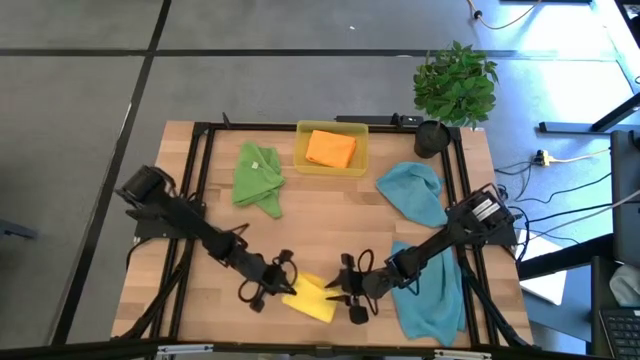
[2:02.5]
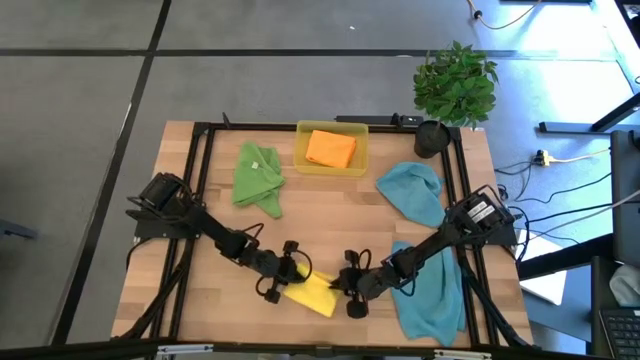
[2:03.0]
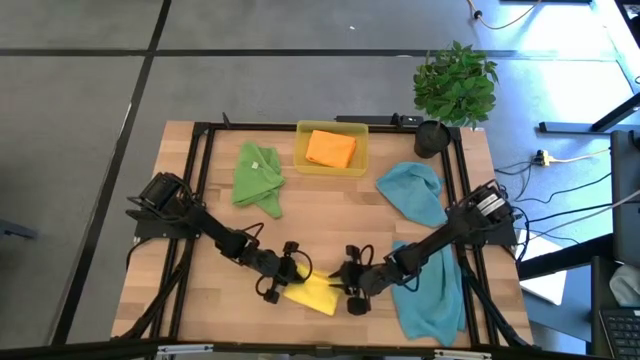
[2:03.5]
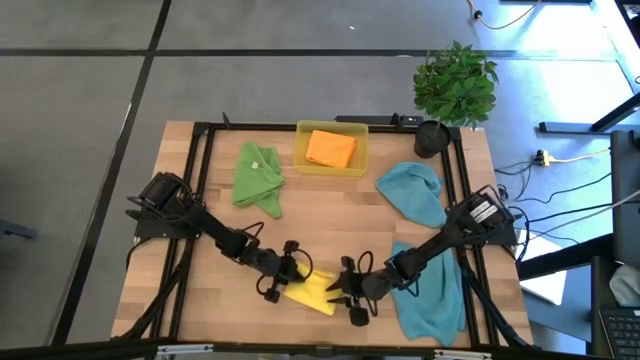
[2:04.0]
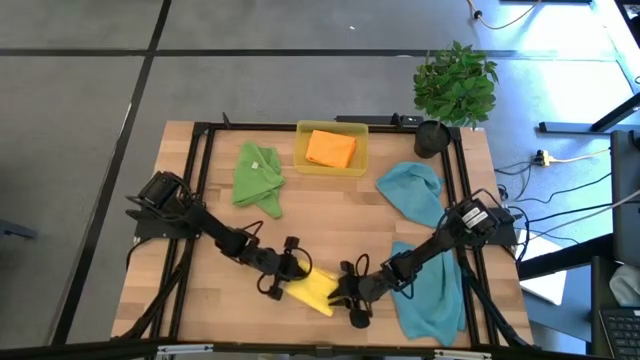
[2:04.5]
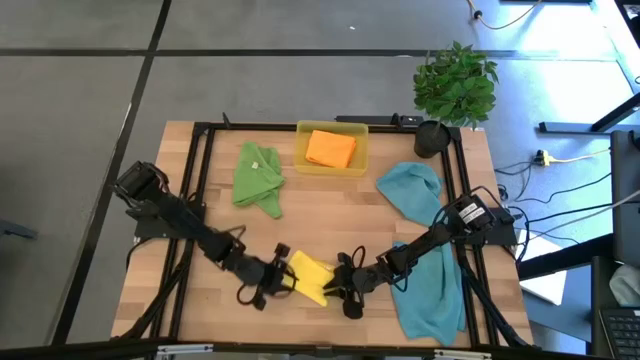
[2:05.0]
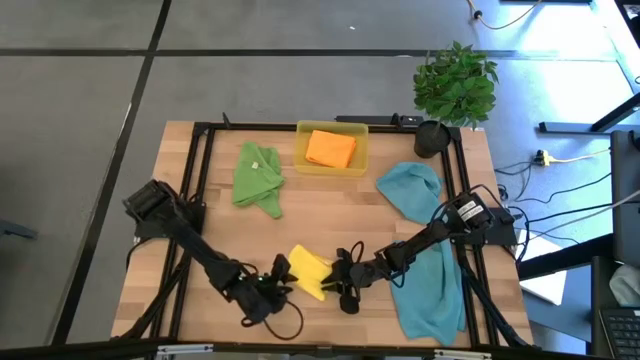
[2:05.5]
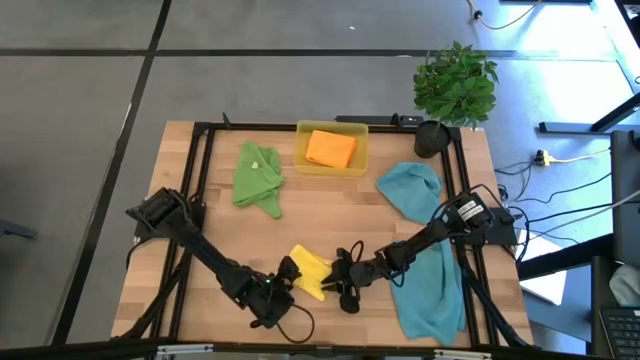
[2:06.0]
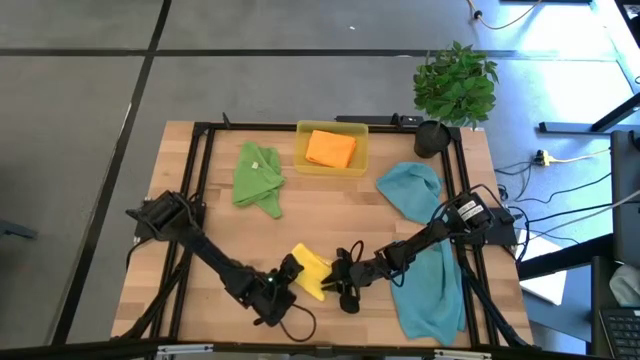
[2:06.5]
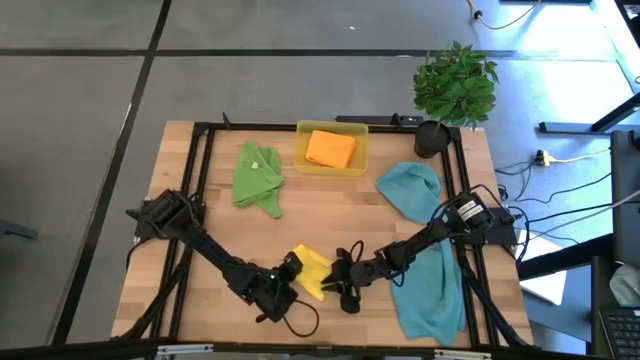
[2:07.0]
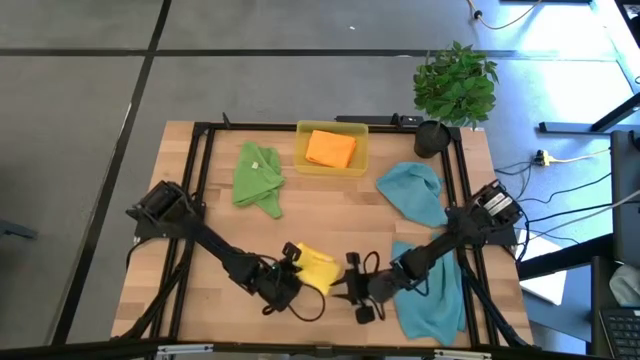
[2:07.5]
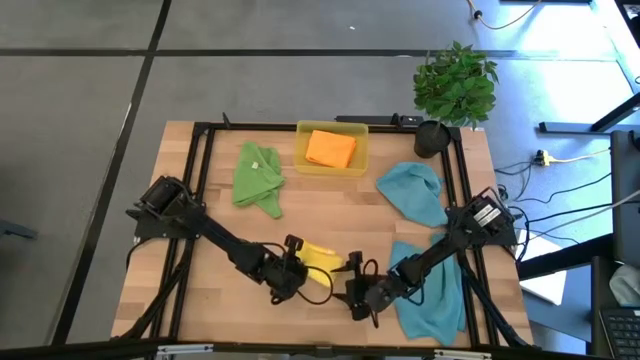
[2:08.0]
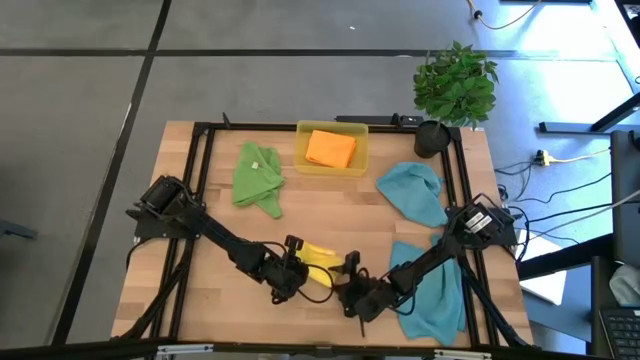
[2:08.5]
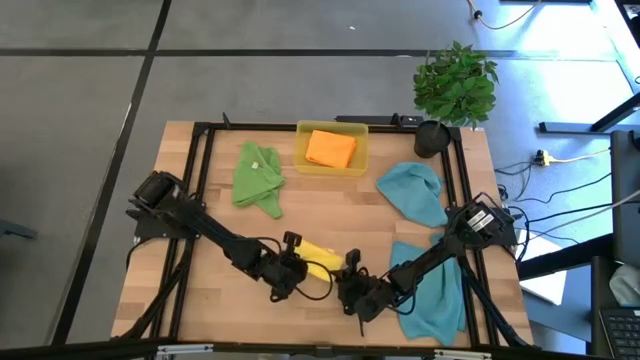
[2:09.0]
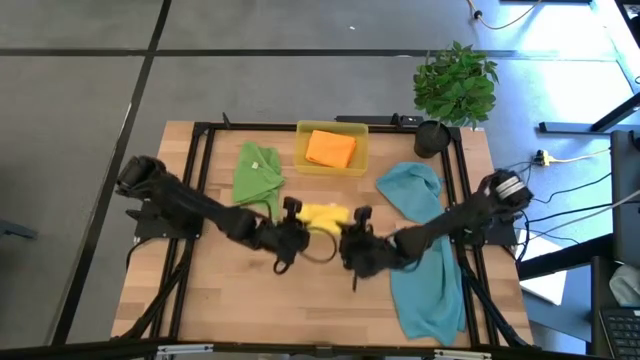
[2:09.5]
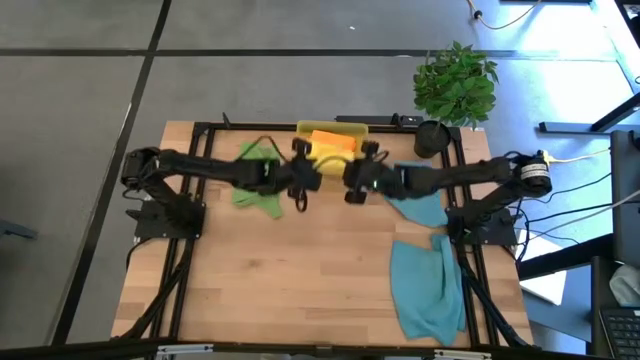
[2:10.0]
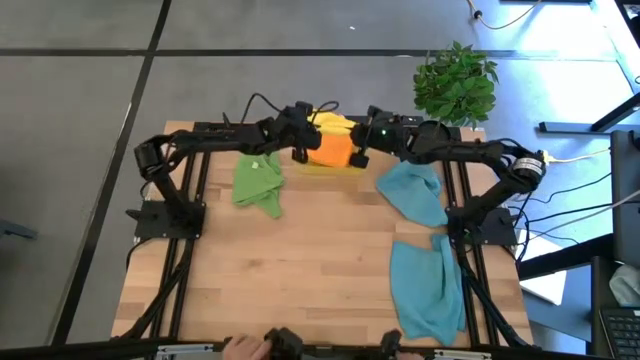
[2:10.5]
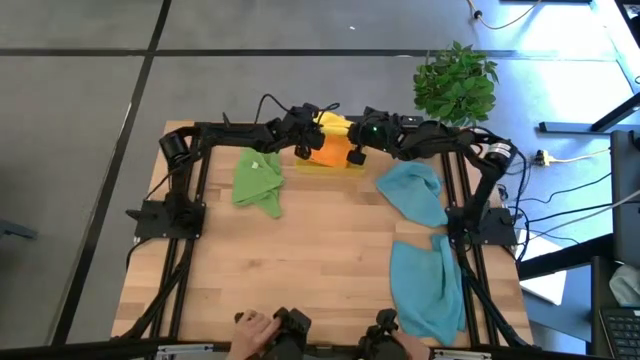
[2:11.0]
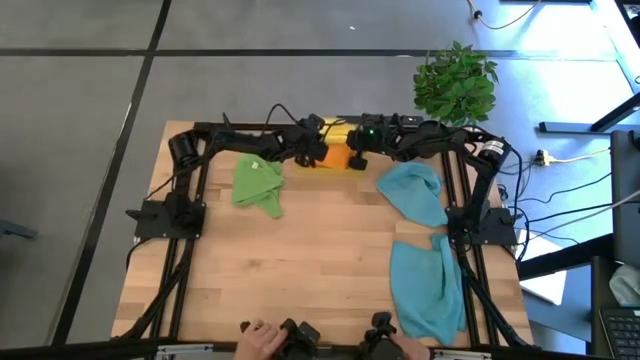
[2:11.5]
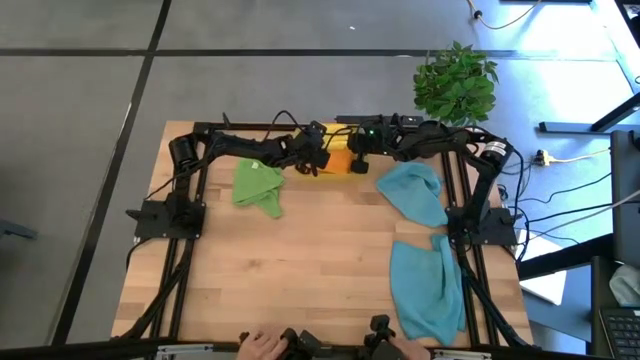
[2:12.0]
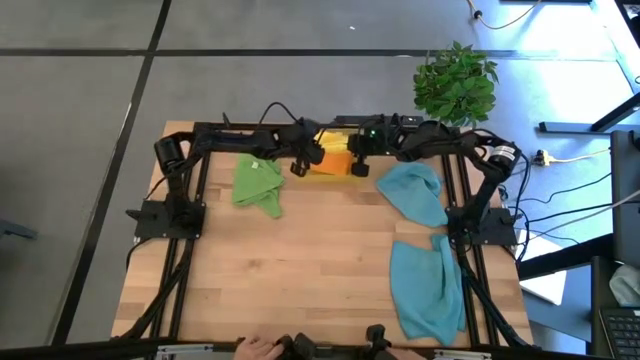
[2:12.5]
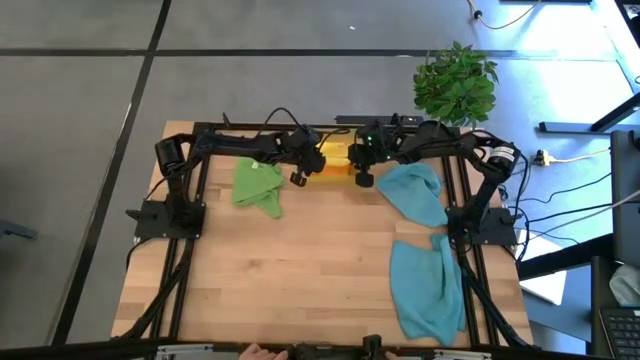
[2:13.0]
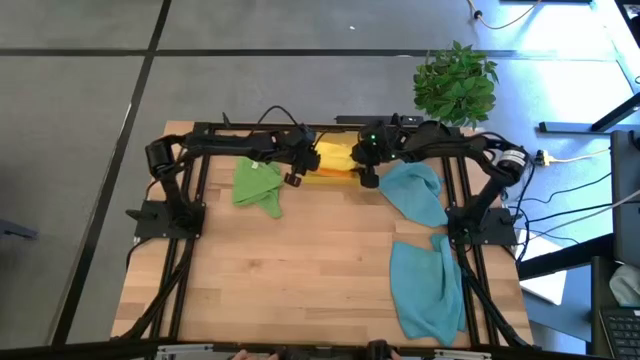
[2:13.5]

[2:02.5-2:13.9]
Task: Fold microfiber towels
Put the folded yellow microfiber cloth into the yellow bin

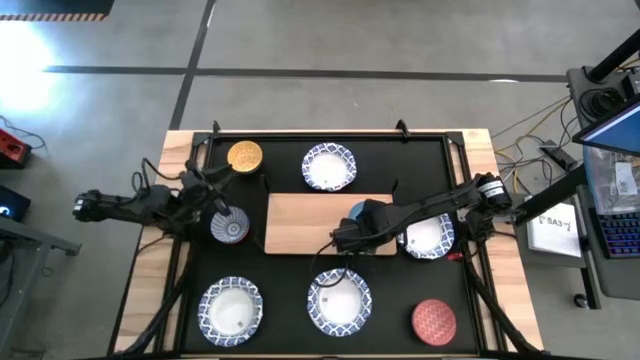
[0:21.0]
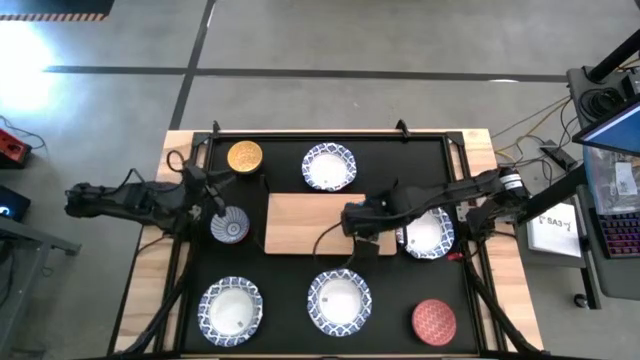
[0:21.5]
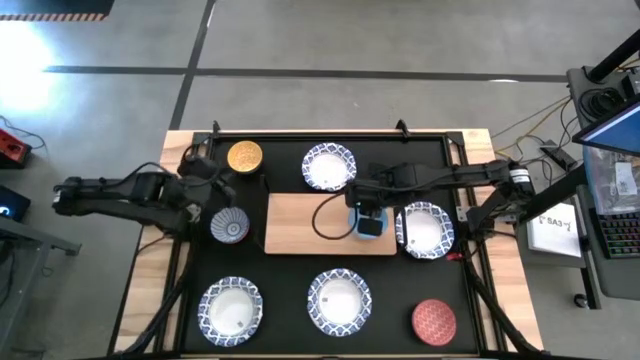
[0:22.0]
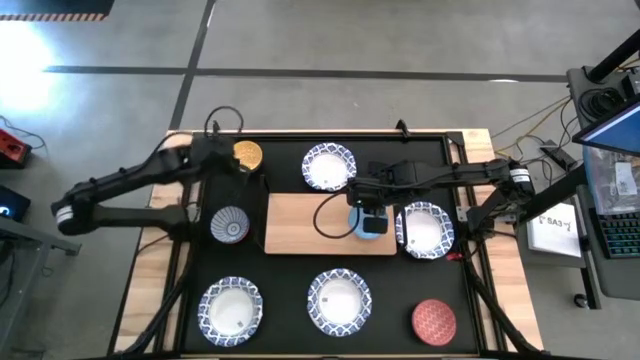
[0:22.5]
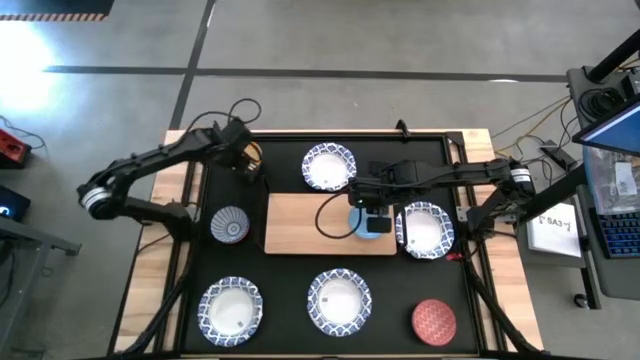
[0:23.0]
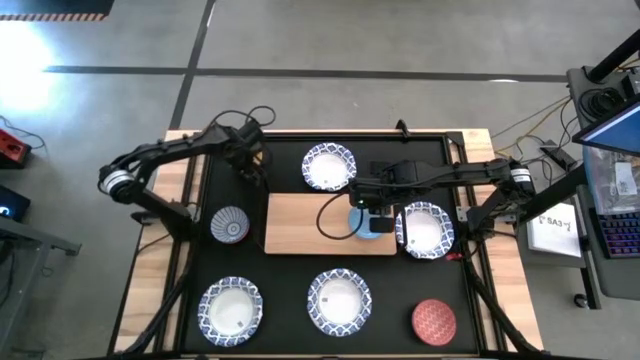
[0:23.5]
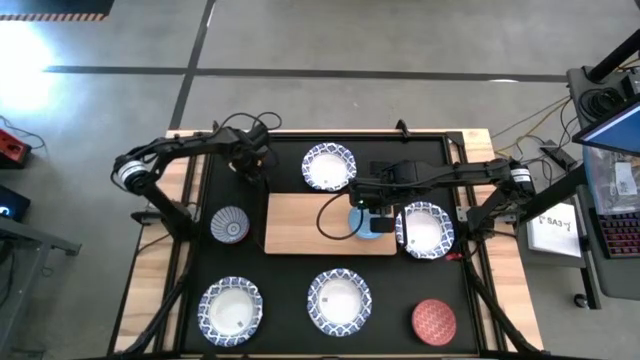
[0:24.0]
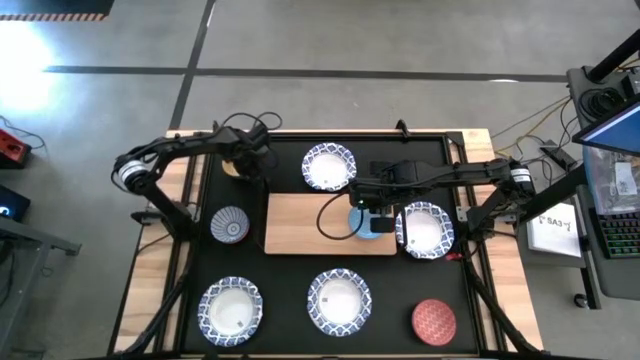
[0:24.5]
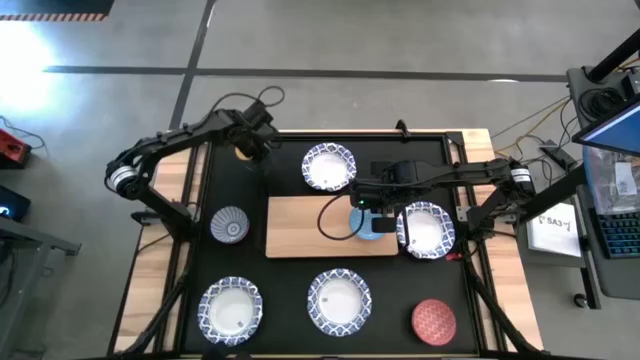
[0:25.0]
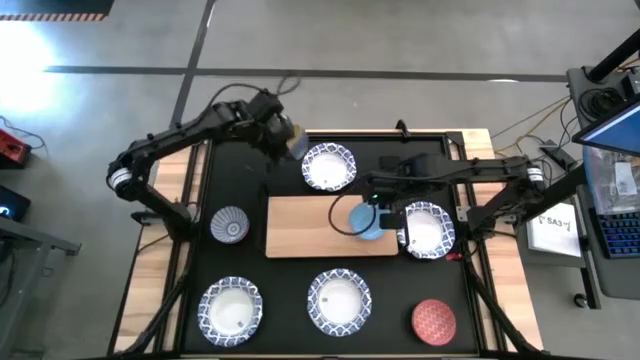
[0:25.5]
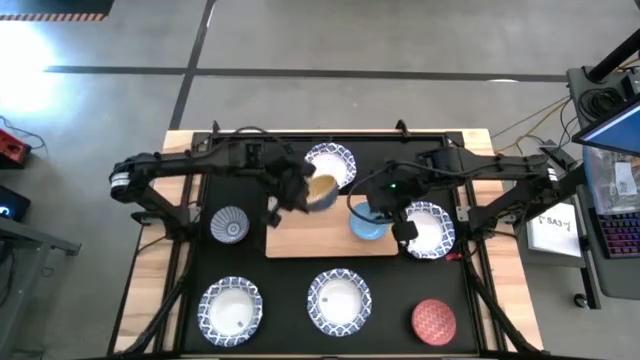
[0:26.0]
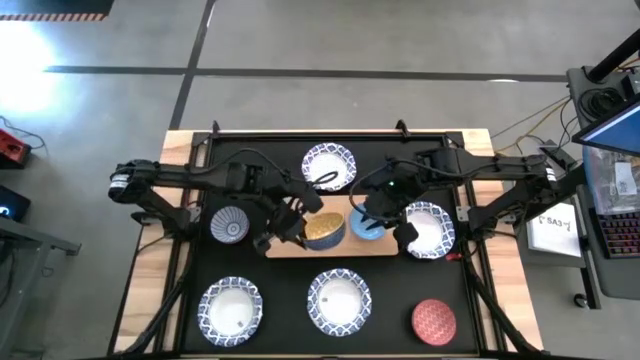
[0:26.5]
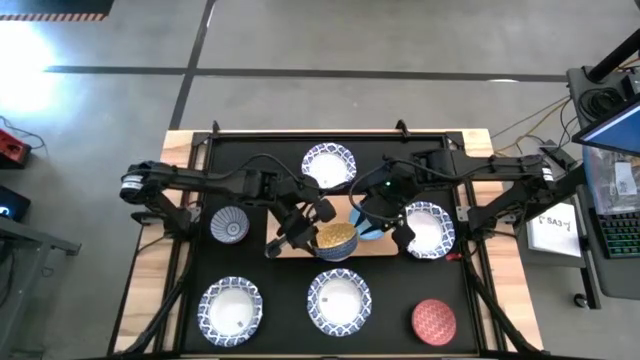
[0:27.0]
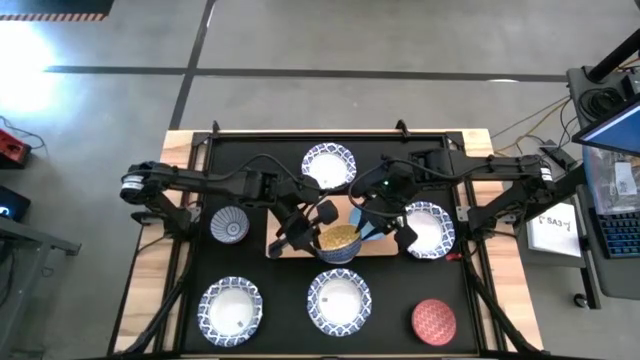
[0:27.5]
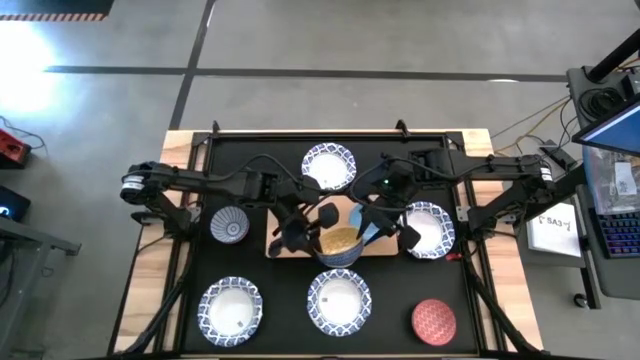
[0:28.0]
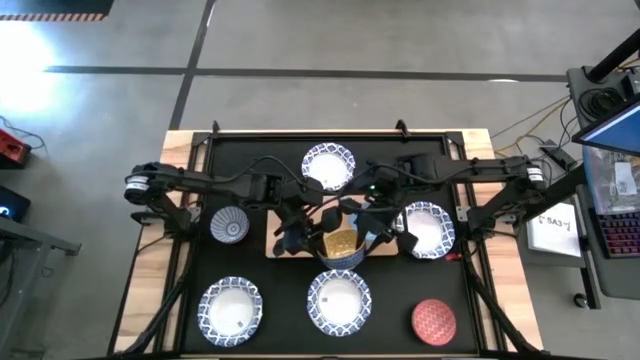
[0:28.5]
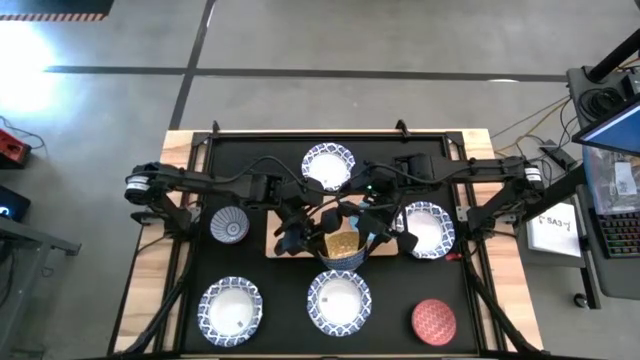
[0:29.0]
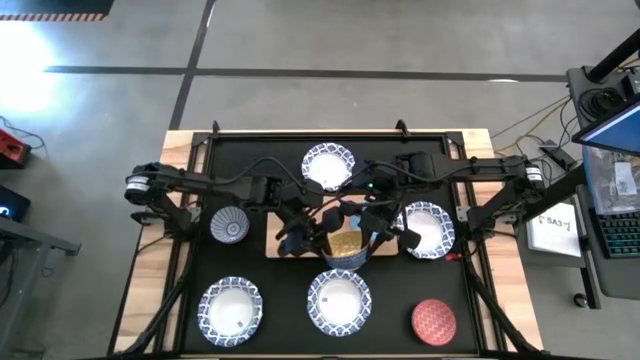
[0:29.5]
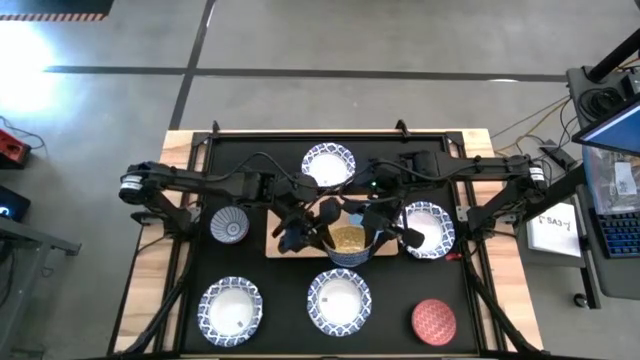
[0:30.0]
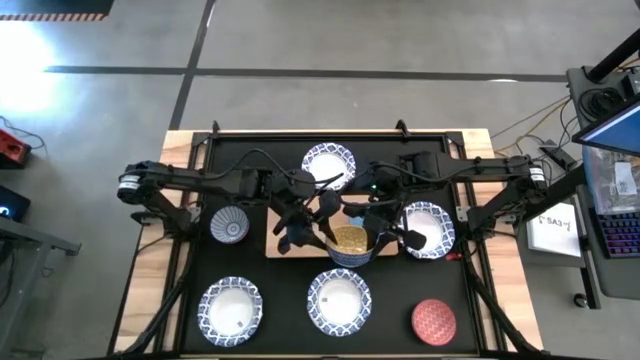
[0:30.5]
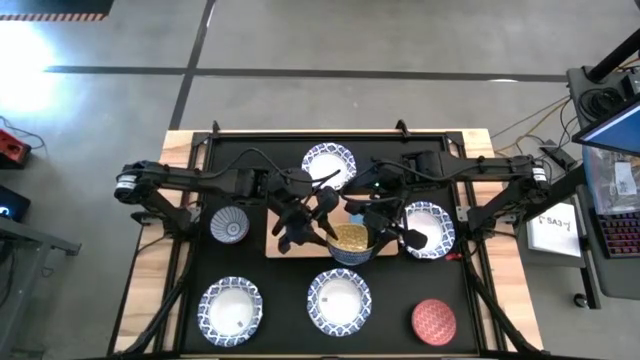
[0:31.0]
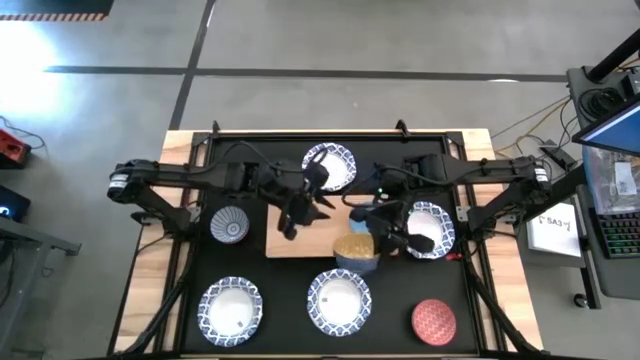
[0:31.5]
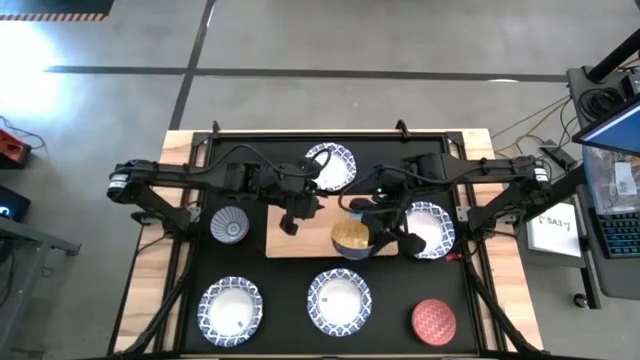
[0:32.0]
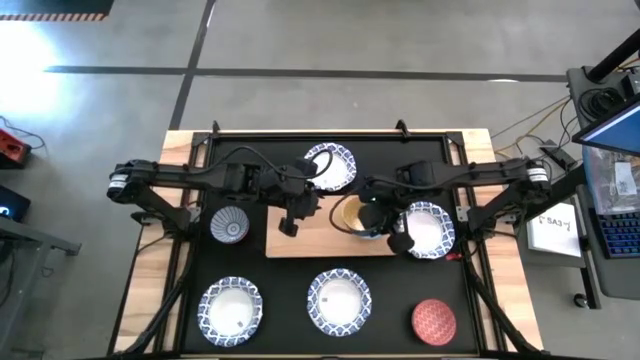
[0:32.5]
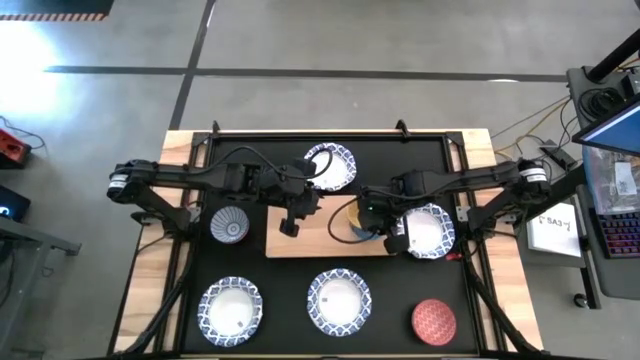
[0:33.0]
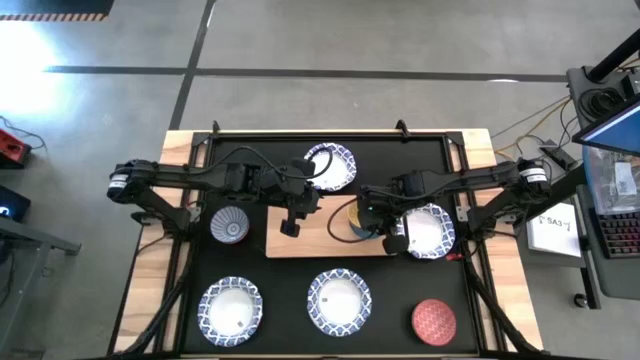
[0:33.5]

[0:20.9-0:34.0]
Task: Place and stack bowls onto a shelf
Stack the small yellow and dark blue patterned bowl on top of the small light blue and yellow patterned bowl
